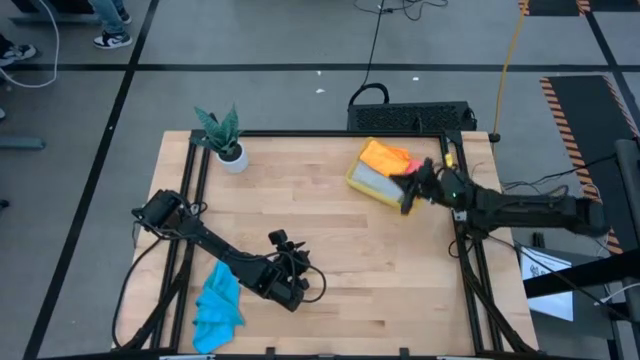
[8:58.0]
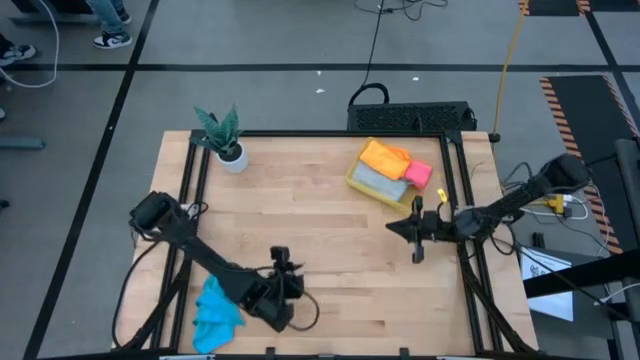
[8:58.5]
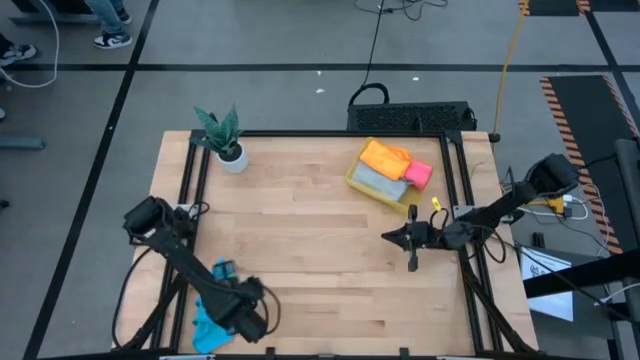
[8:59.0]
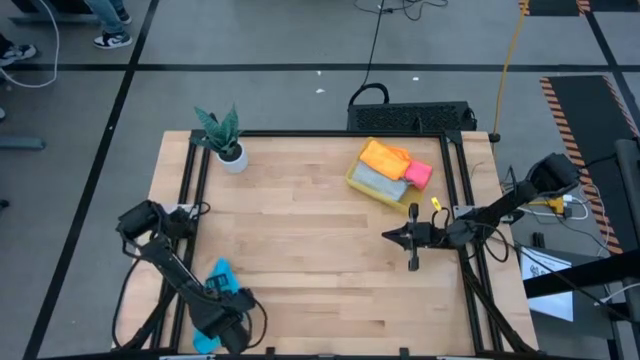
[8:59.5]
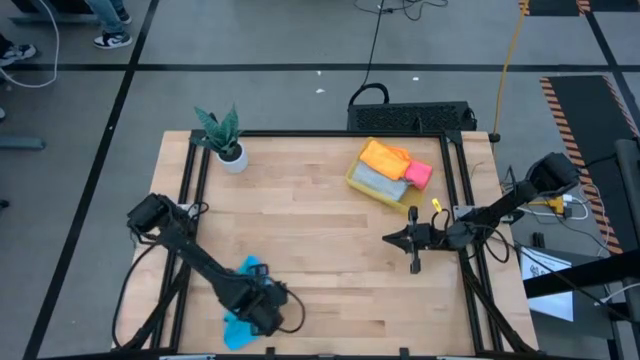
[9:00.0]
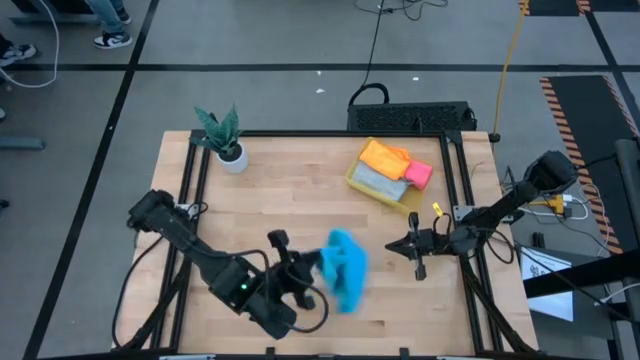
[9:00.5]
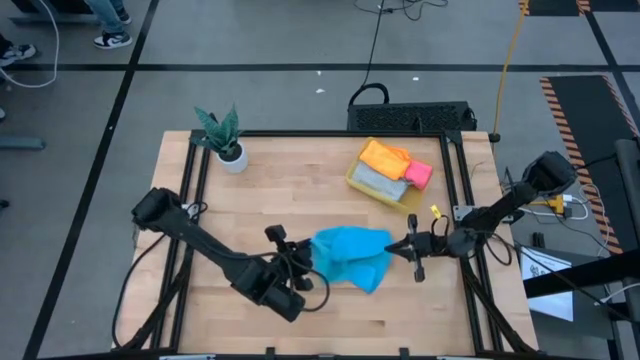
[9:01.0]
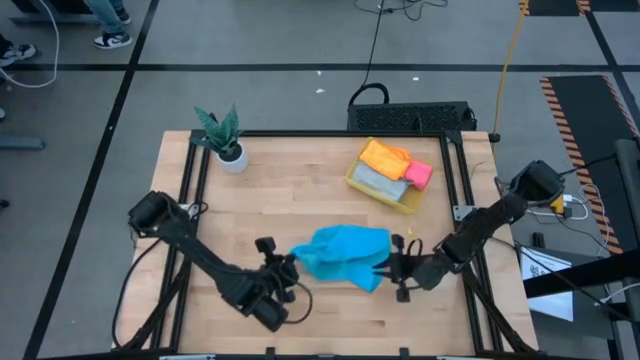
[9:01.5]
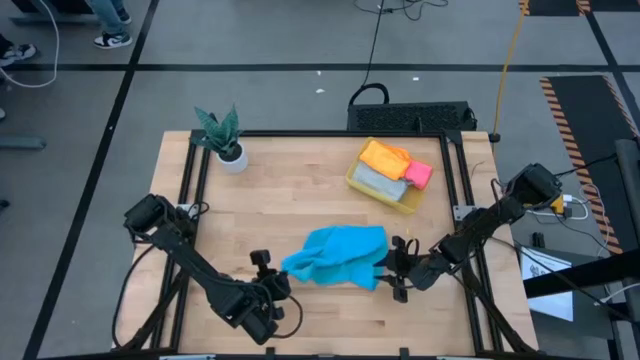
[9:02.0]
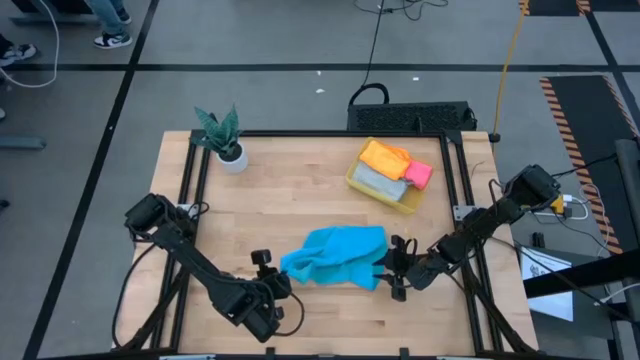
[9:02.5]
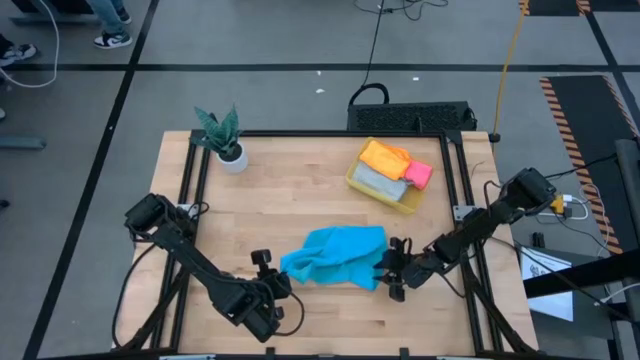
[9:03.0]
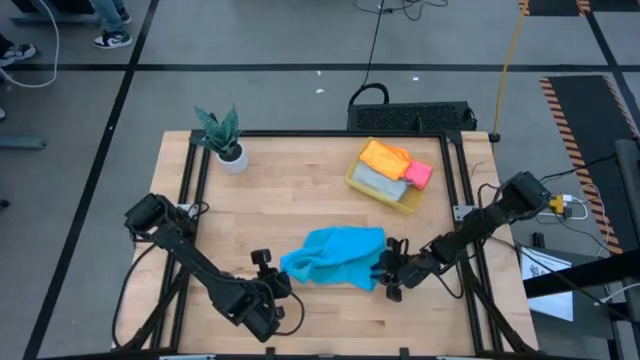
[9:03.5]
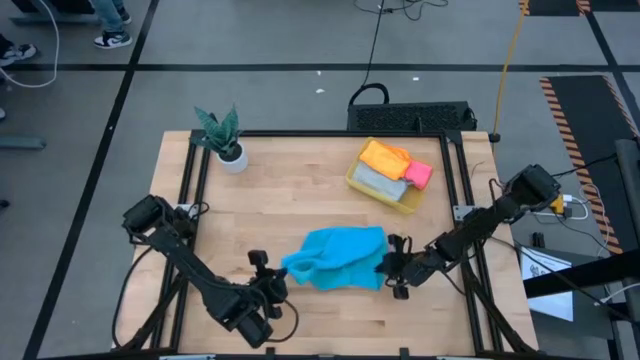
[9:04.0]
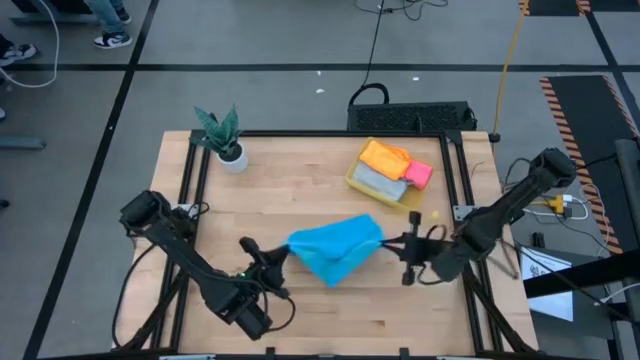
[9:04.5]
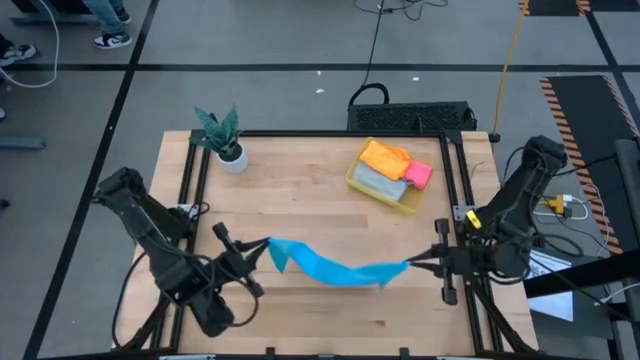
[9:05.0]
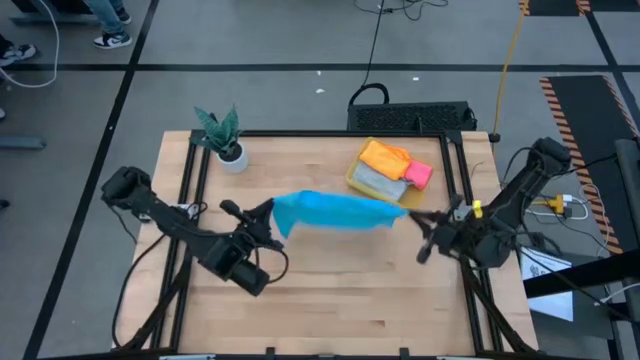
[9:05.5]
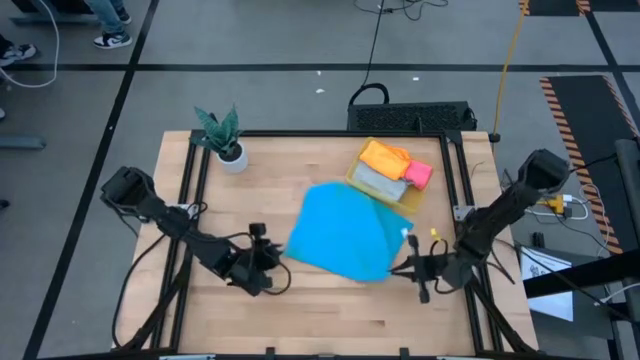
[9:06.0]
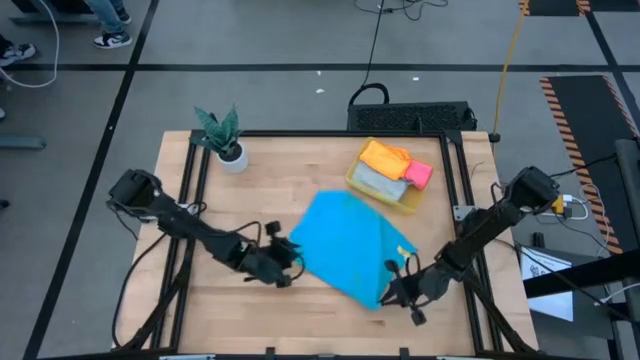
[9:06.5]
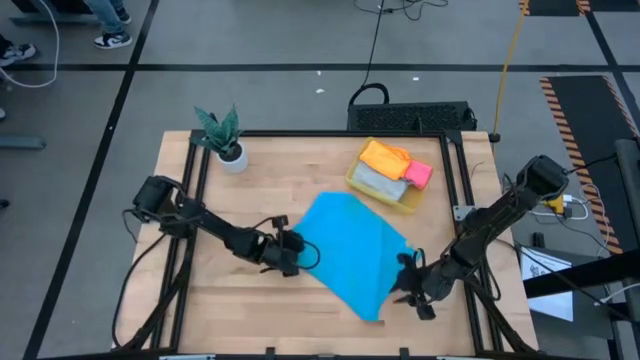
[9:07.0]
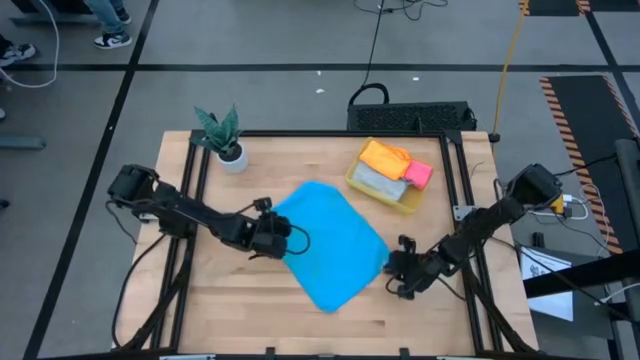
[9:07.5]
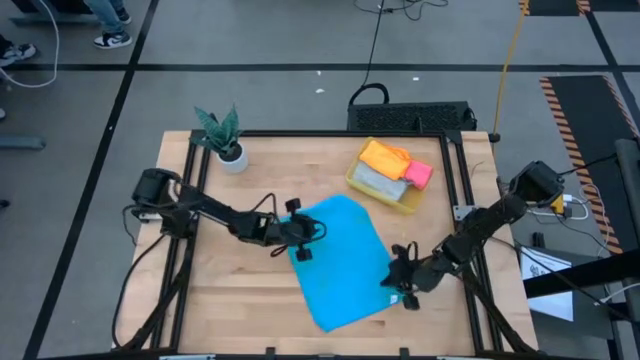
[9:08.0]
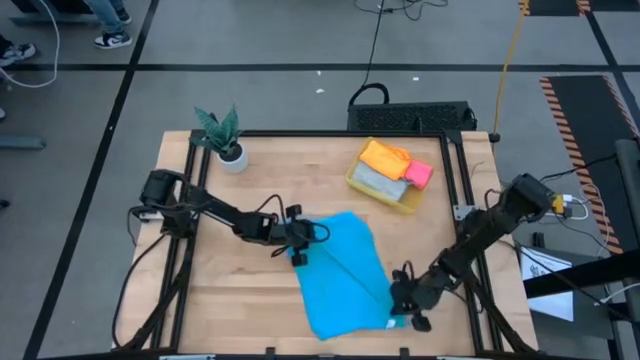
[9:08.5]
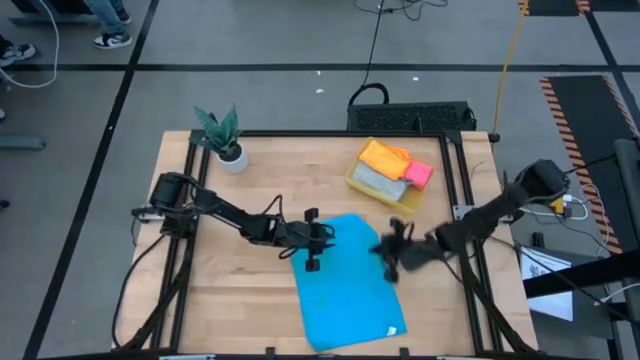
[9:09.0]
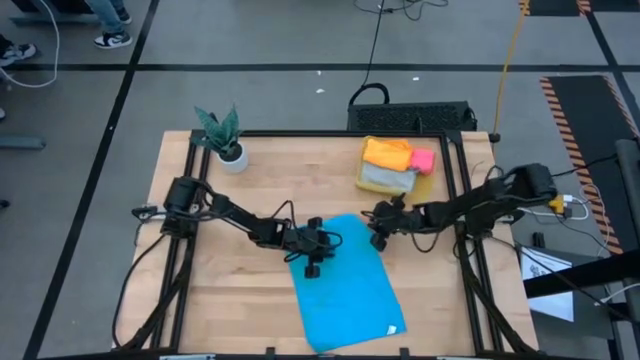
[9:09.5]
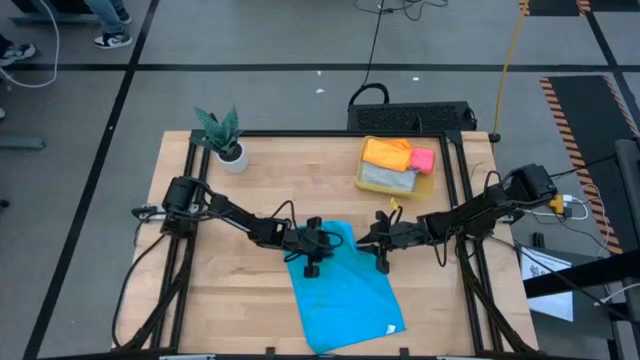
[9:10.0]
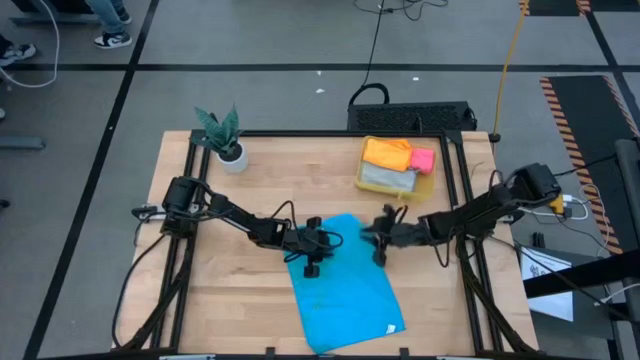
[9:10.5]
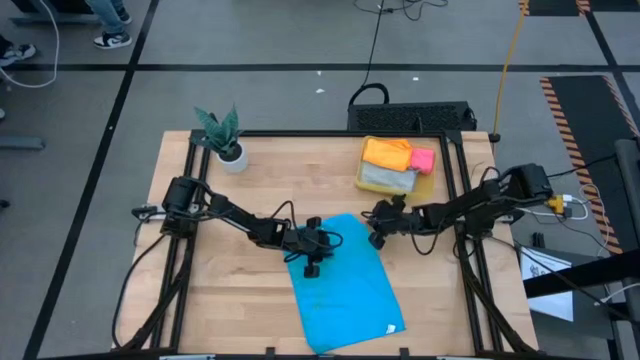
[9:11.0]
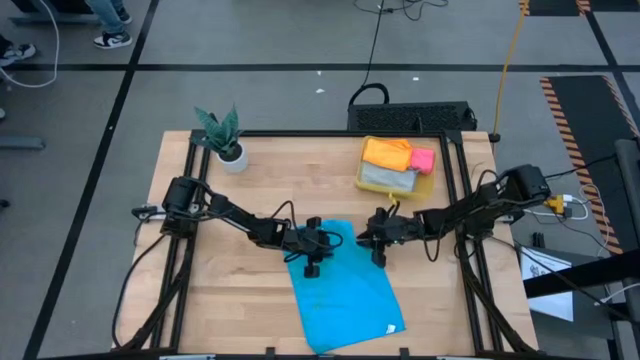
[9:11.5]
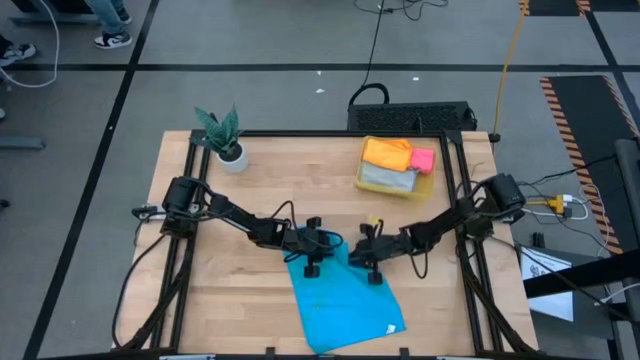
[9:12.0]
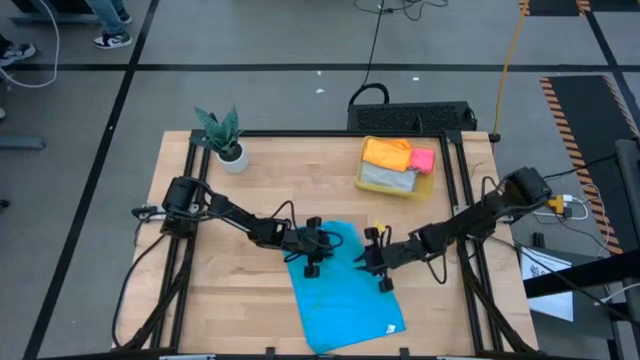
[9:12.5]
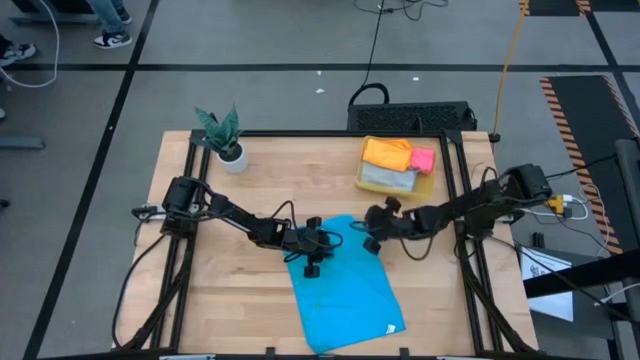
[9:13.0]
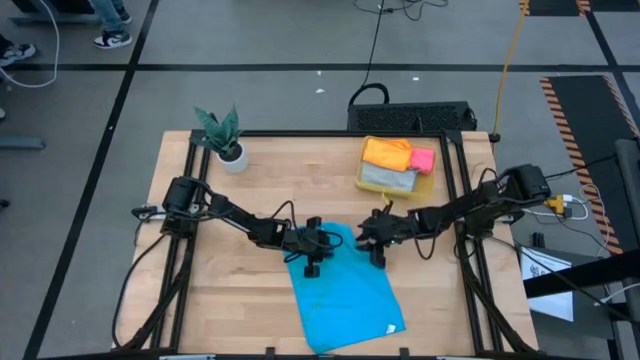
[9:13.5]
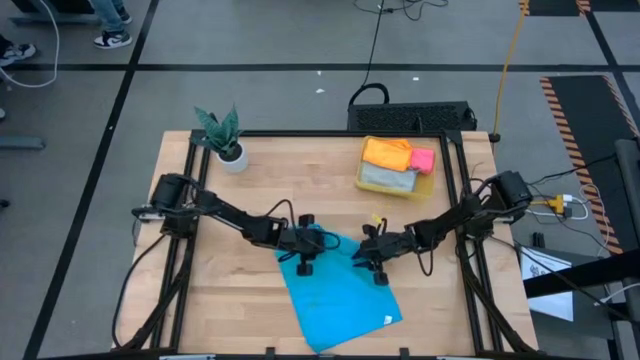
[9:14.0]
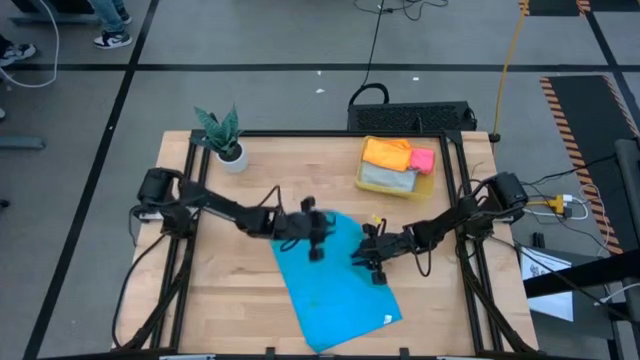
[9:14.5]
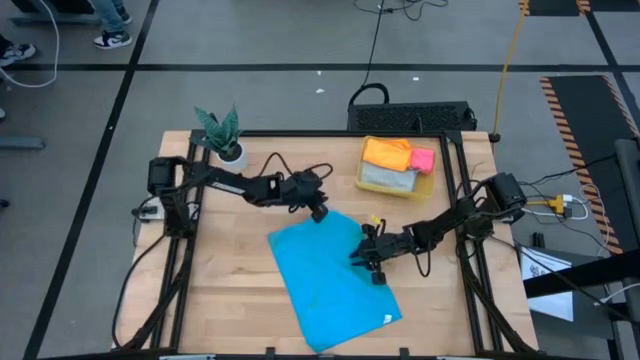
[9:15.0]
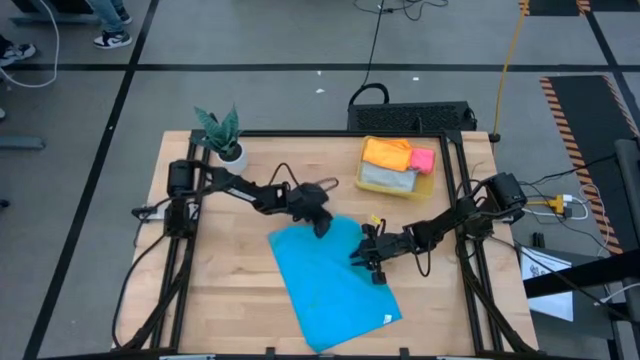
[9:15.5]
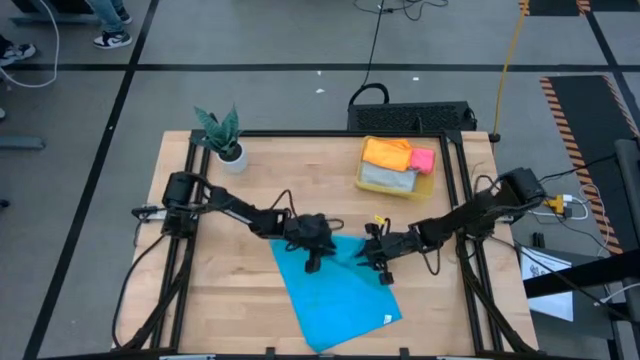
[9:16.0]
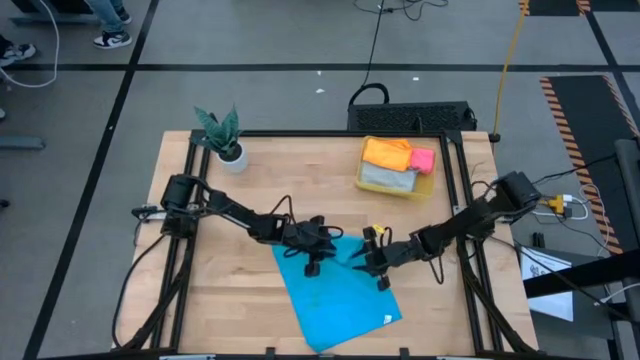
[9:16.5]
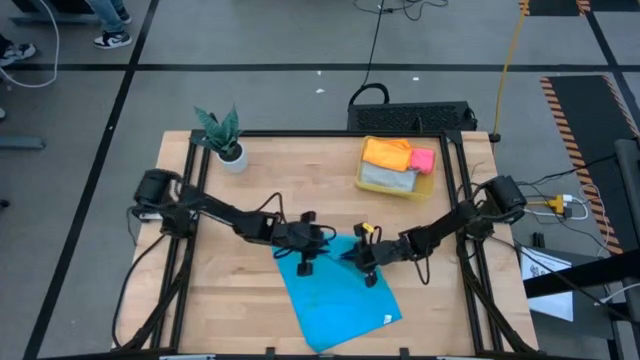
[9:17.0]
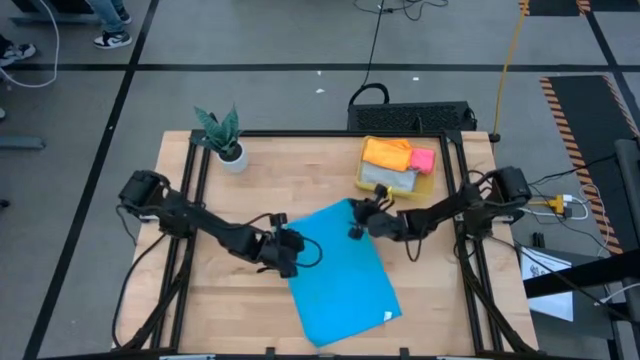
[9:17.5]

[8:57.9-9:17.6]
Task: Fold microfiber towels
Fold the blue kitchen towel
